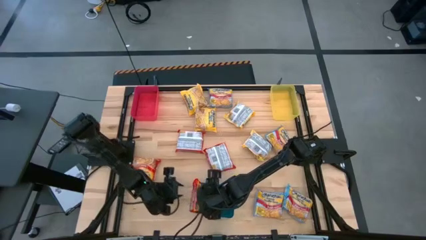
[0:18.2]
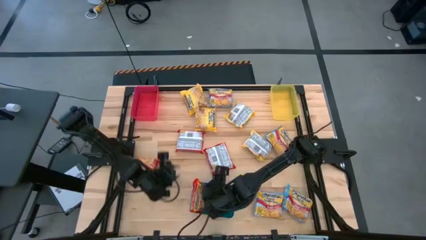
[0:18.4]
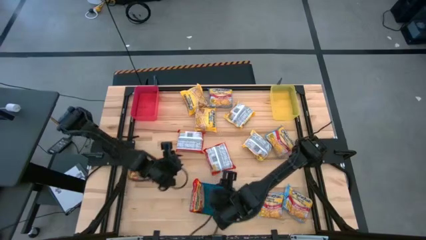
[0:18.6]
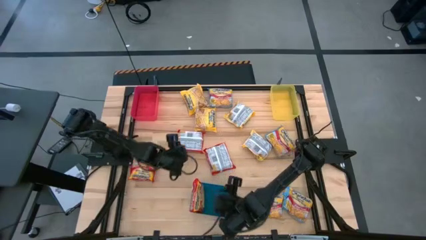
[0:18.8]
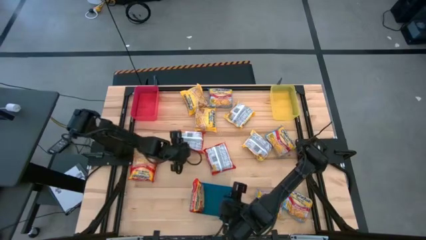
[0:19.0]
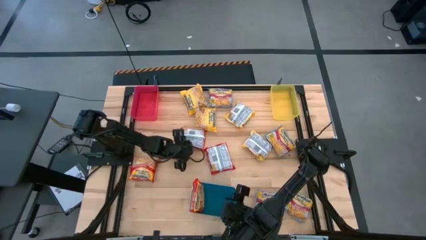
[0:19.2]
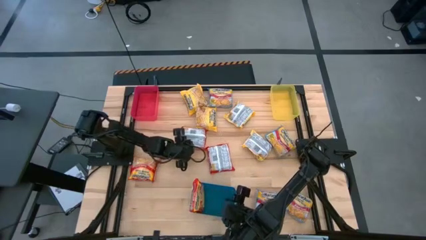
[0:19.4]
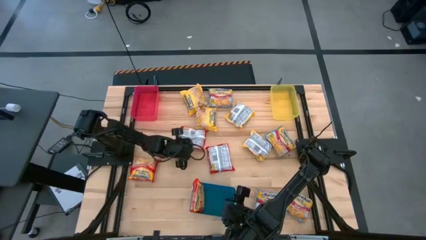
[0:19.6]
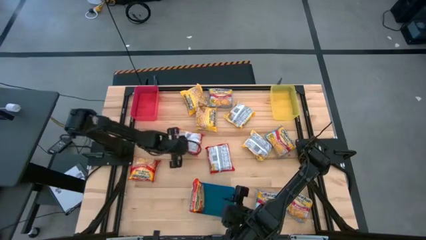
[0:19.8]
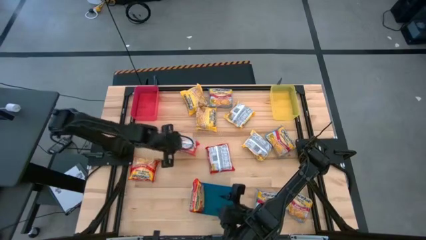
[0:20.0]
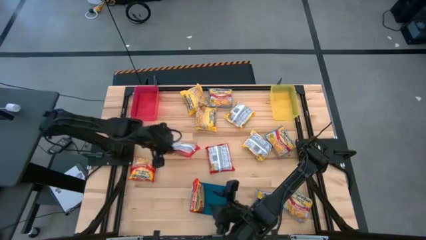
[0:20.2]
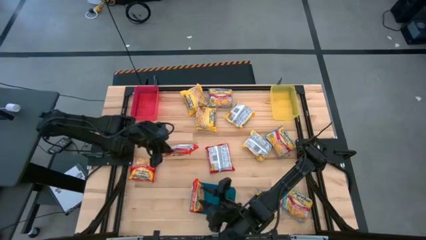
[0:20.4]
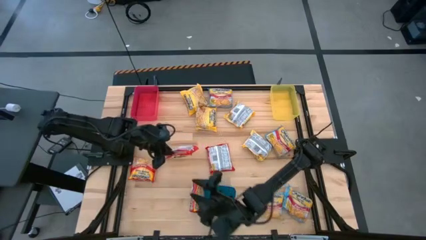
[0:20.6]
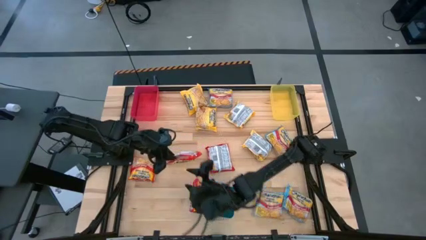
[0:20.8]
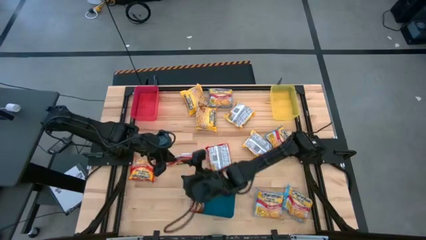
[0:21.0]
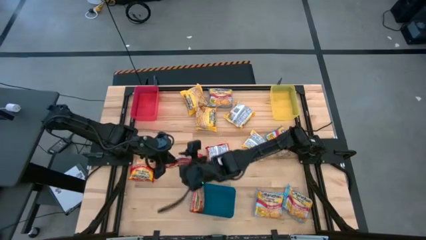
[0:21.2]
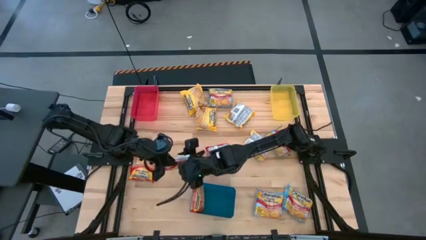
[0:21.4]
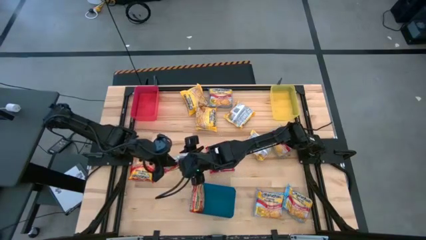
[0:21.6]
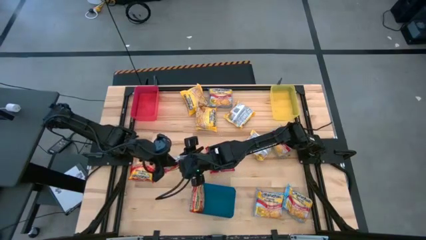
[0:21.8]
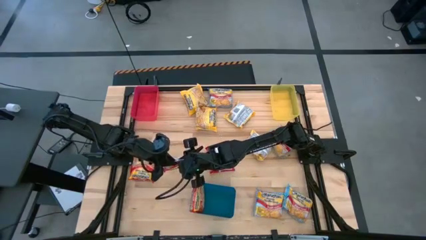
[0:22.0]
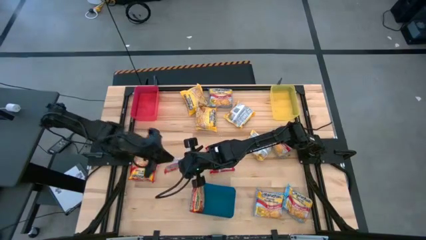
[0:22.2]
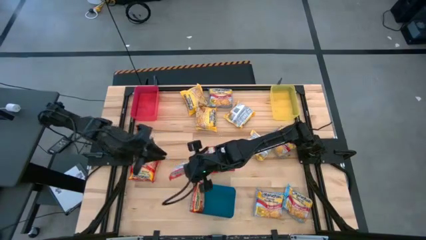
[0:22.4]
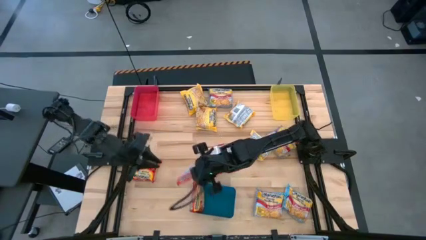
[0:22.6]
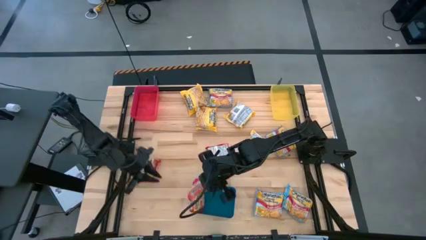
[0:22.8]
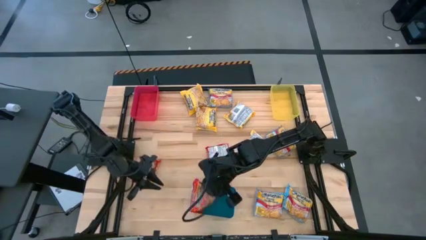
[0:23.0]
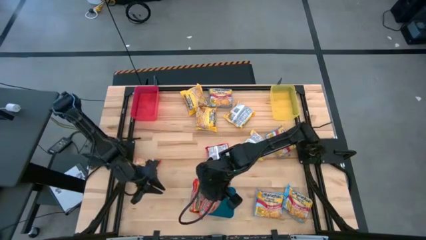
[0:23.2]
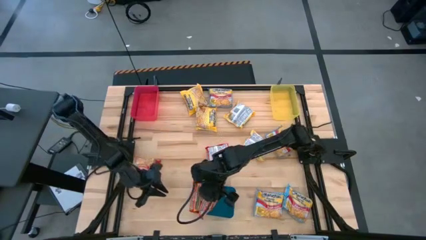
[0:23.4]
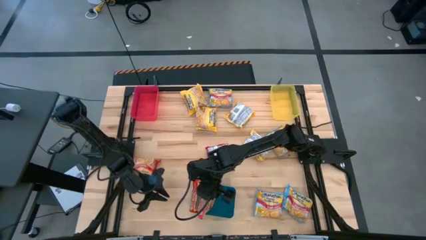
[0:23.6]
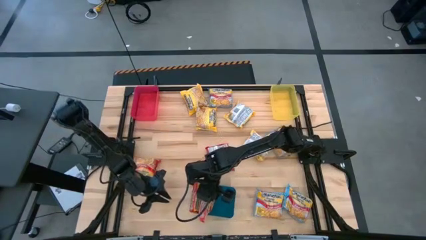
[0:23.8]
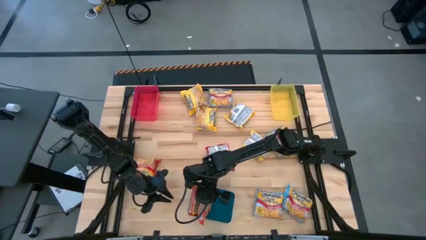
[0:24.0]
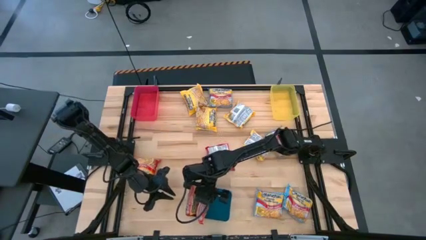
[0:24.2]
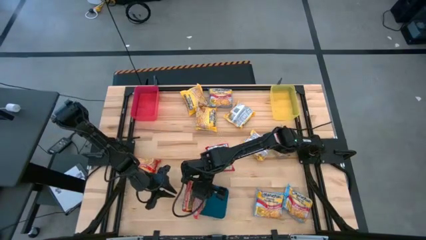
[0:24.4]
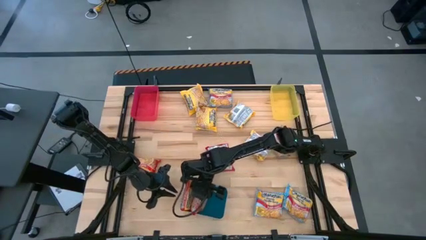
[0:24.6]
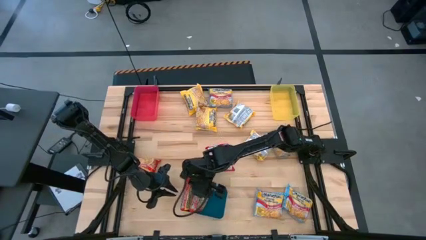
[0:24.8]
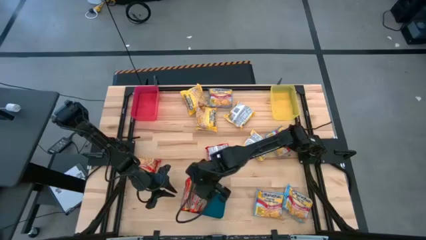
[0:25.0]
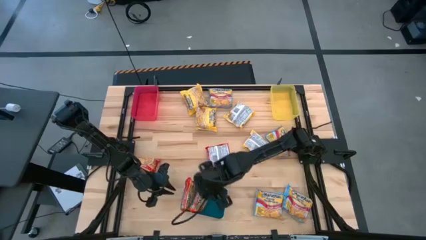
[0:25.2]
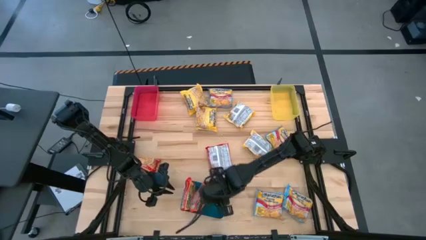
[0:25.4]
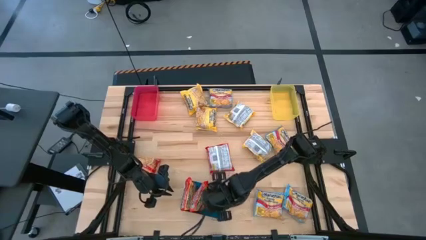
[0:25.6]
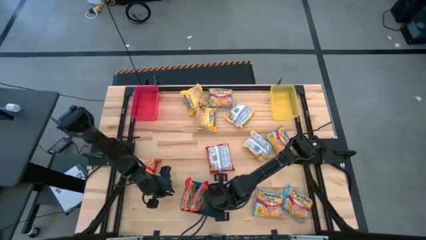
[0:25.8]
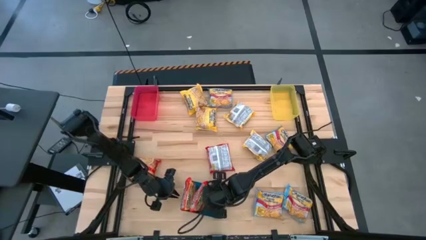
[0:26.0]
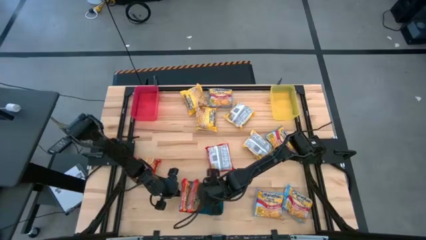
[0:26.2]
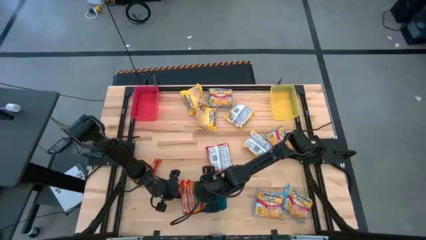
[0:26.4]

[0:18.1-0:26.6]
Task: Sort Maruchan noodles
Put the middle red noodle pack into the blue bin

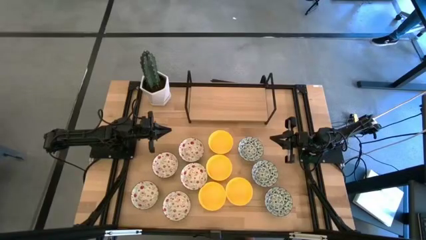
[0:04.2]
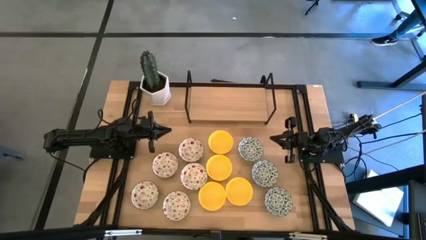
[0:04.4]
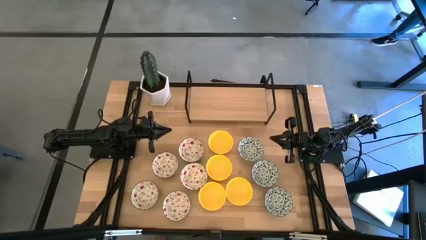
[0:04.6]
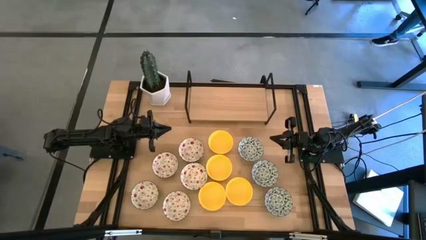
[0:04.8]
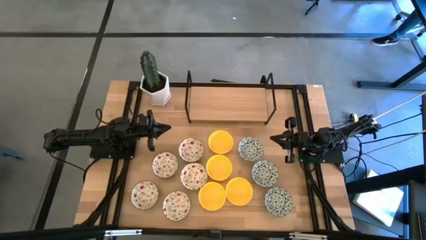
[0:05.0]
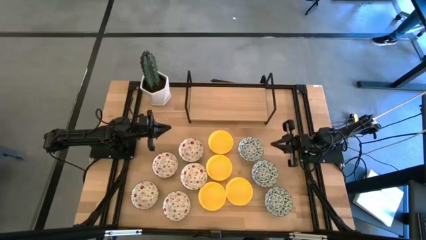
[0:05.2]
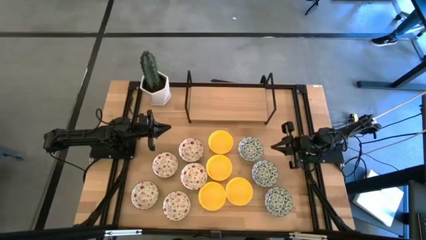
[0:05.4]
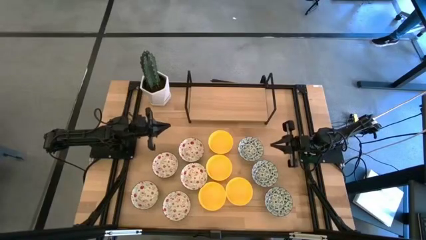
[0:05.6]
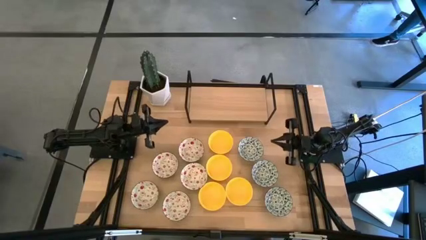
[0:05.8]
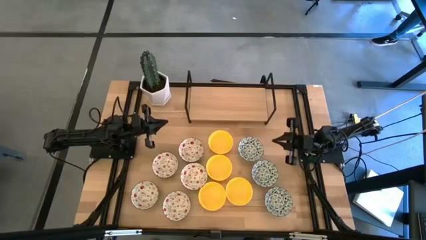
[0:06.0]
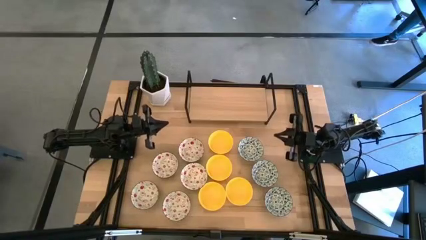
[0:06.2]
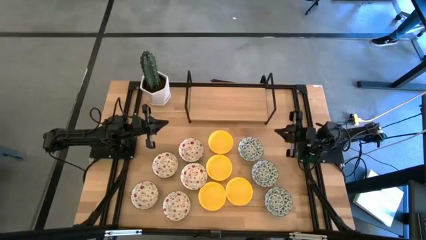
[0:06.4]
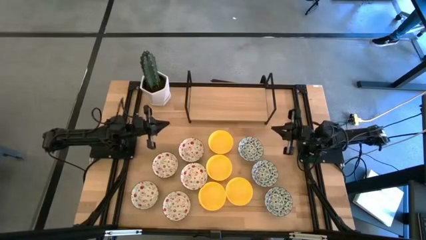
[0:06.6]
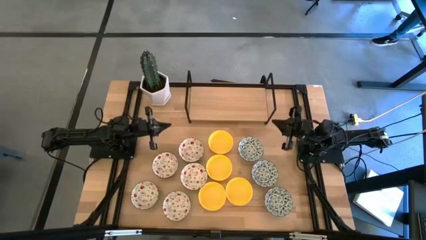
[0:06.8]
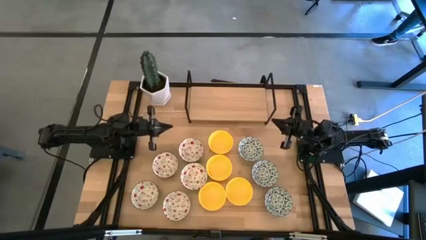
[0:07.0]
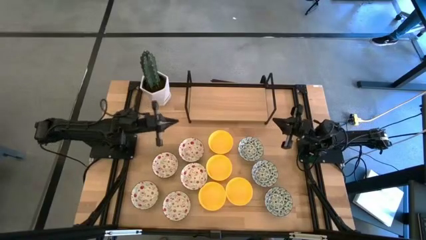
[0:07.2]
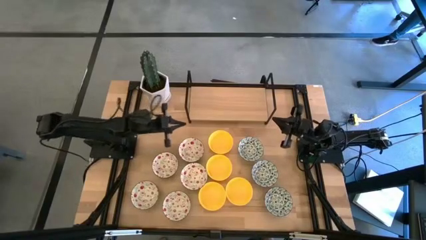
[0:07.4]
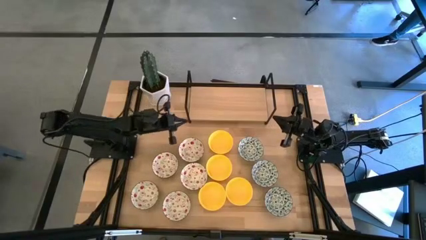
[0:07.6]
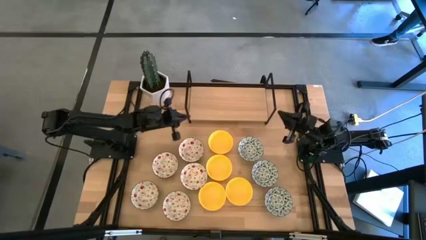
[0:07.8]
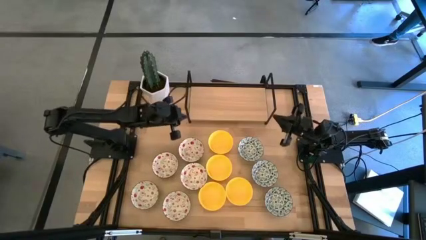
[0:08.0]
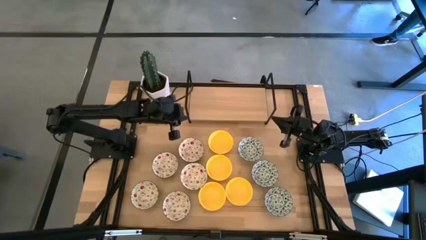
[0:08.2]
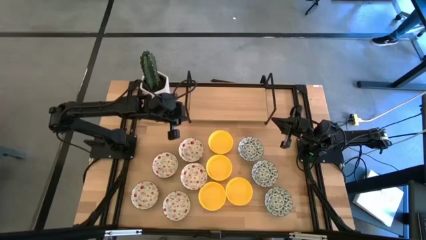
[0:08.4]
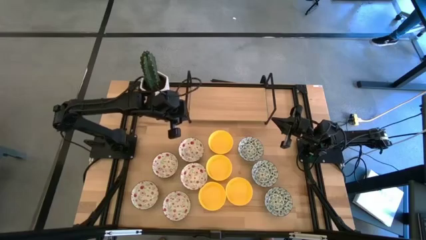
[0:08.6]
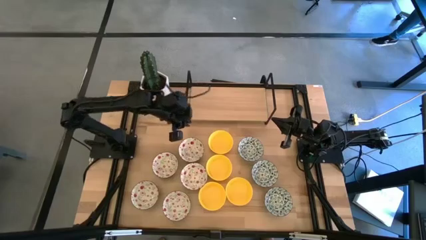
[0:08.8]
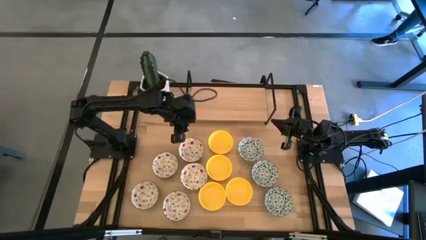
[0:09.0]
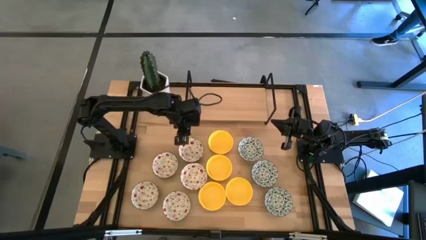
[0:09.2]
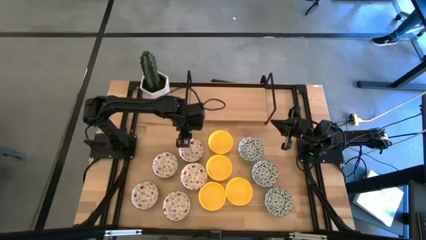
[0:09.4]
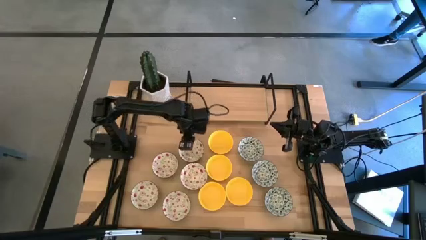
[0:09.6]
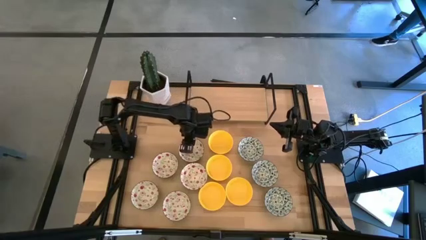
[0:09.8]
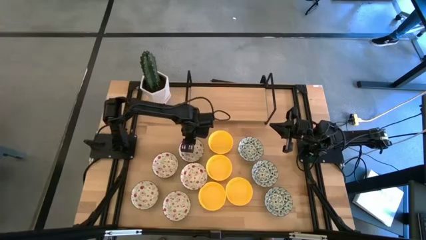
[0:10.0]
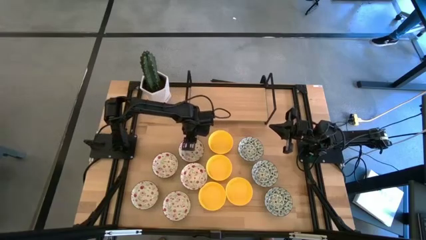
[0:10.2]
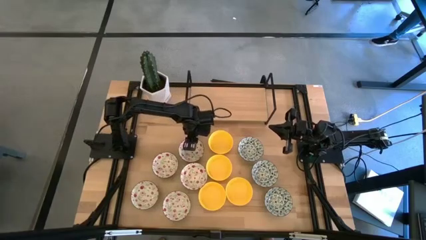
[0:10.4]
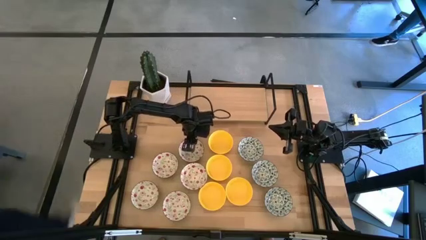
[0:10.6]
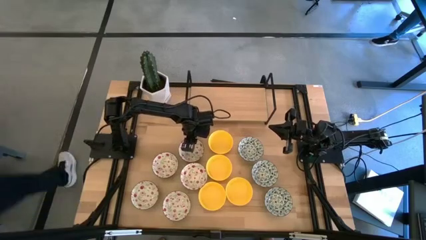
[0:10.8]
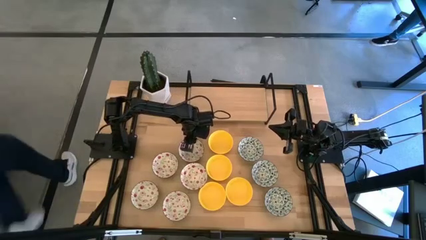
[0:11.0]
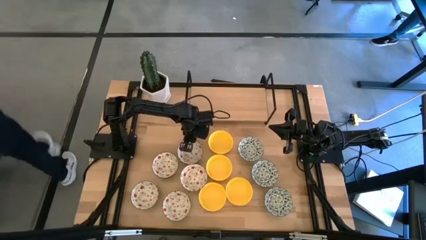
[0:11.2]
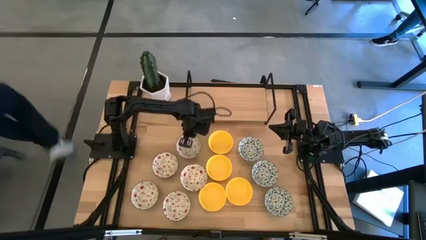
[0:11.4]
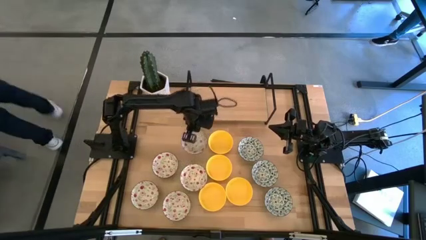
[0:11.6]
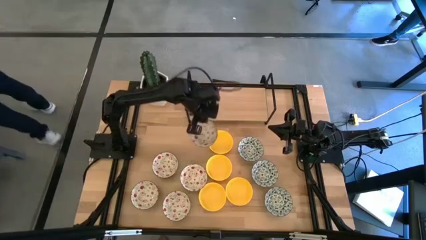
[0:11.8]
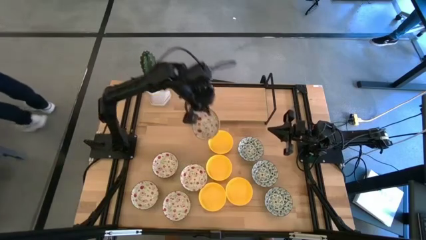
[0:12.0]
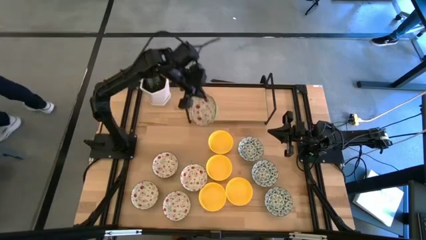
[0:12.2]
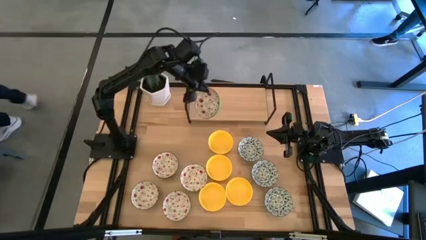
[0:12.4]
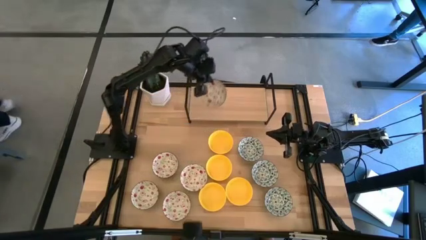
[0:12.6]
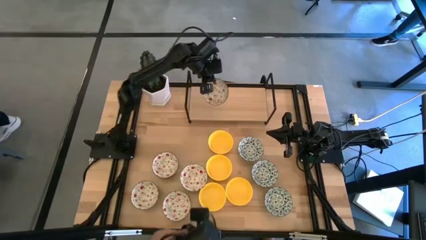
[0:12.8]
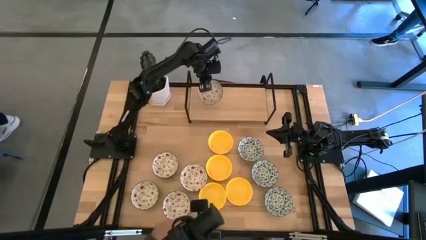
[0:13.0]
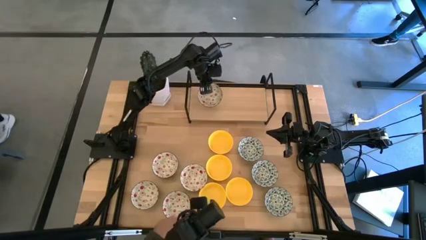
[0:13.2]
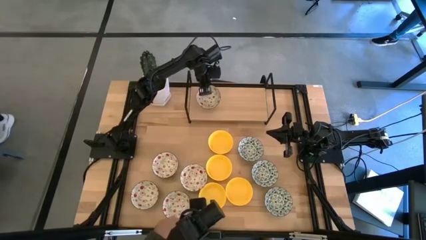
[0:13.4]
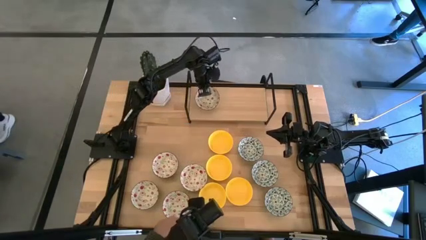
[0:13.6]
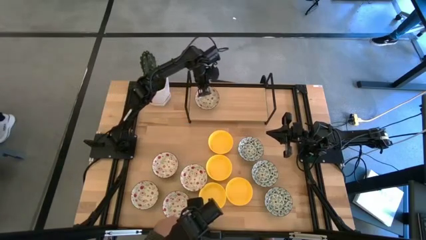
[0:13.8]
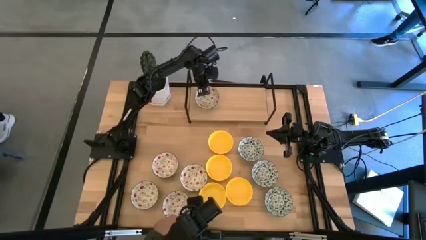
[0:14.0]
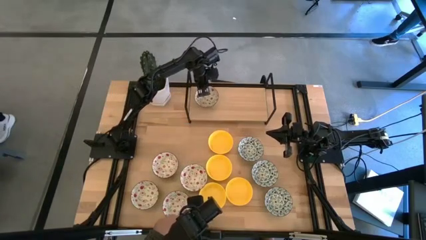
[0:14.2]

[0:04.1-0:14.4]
Task: Pick & Place Mini bowls
Put the red green bowl on the shelf
